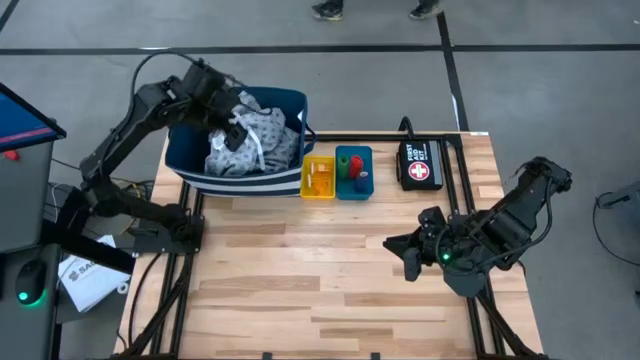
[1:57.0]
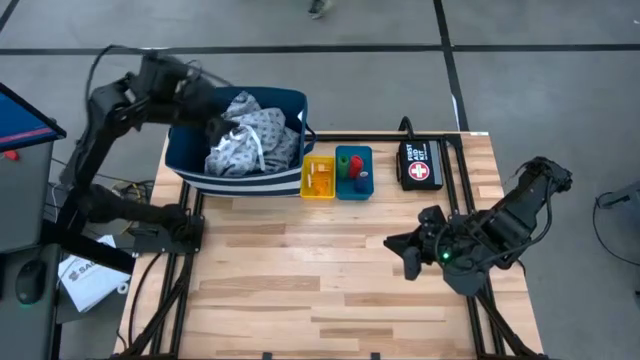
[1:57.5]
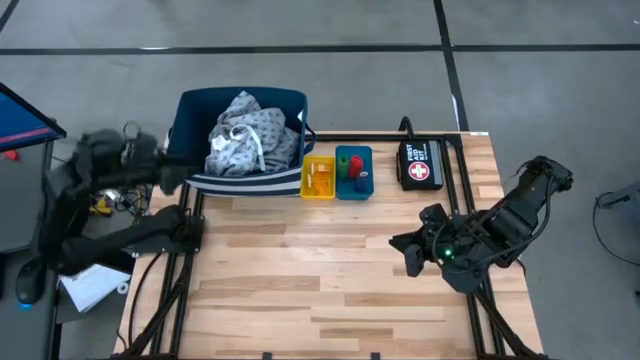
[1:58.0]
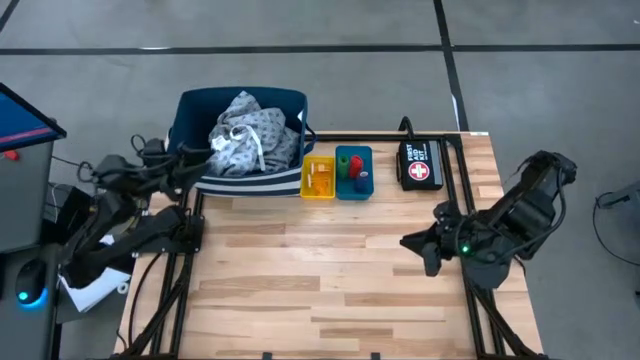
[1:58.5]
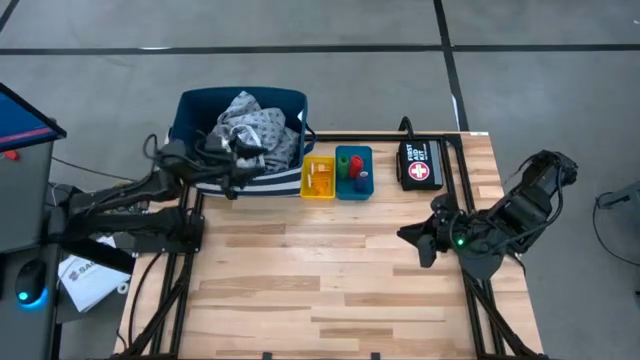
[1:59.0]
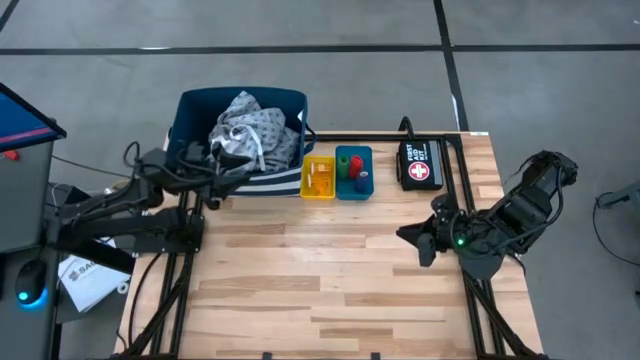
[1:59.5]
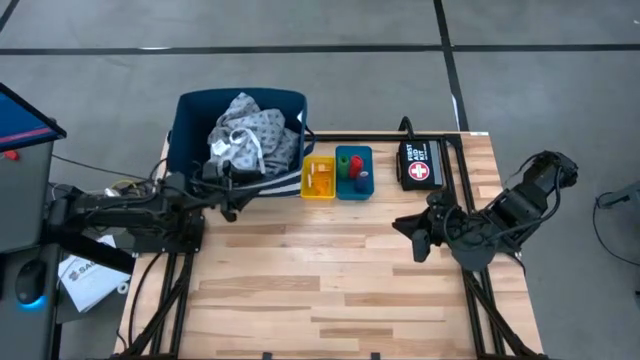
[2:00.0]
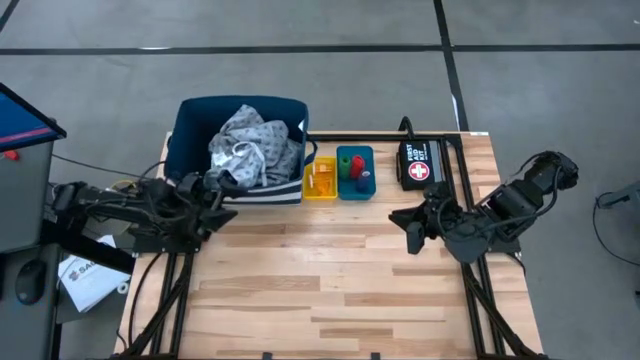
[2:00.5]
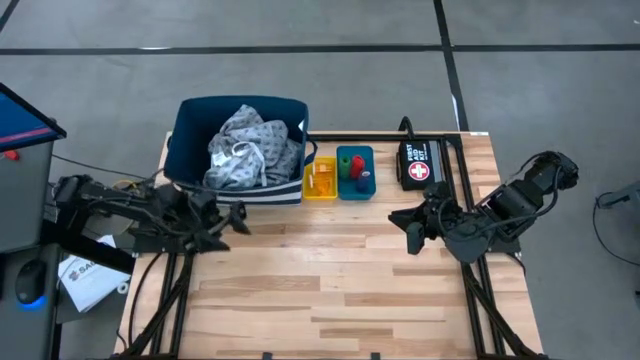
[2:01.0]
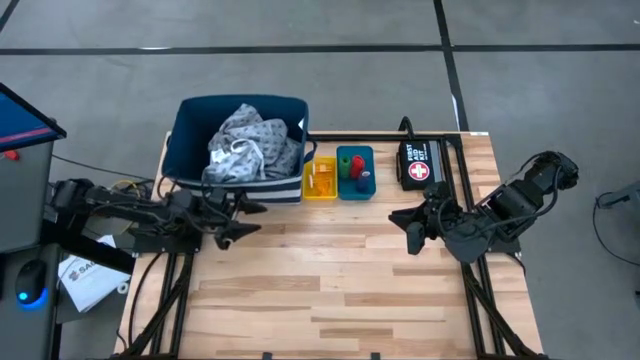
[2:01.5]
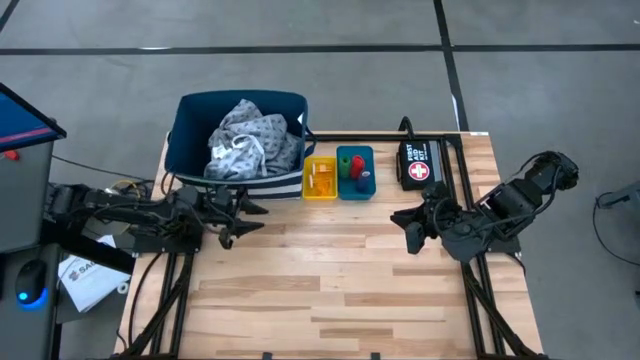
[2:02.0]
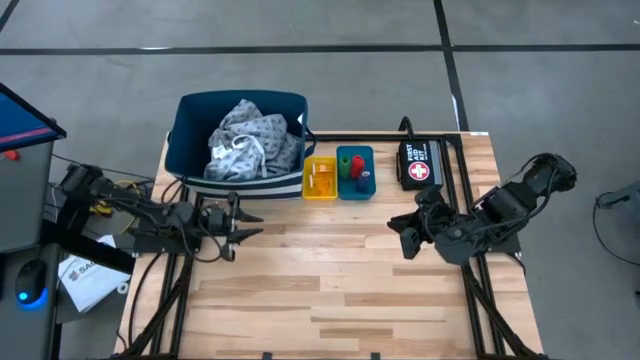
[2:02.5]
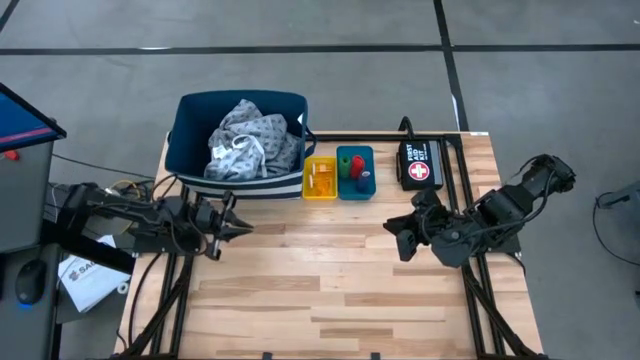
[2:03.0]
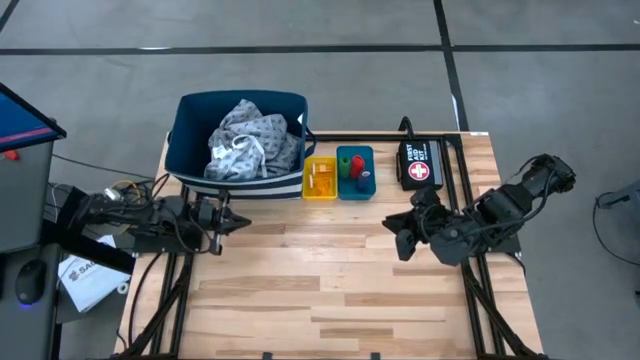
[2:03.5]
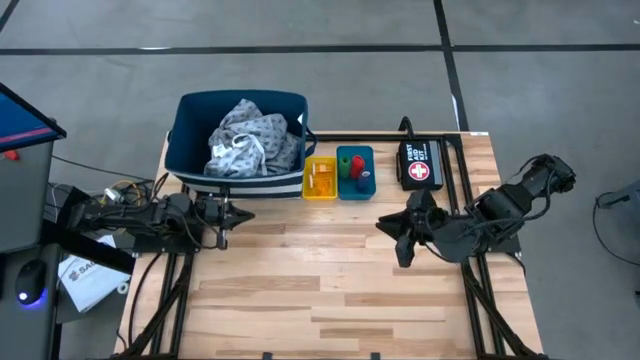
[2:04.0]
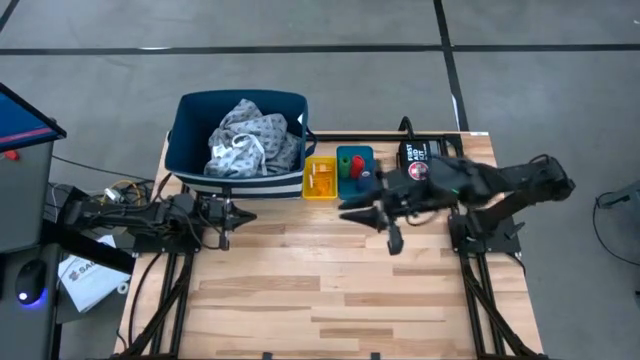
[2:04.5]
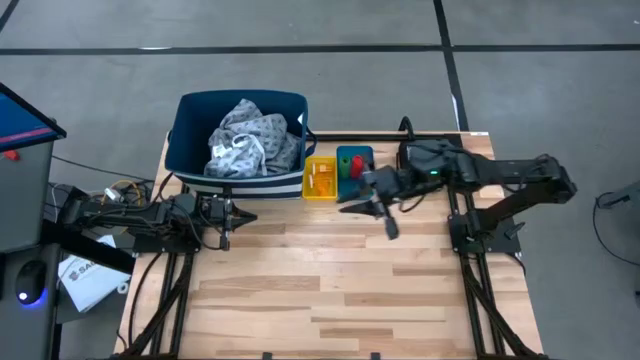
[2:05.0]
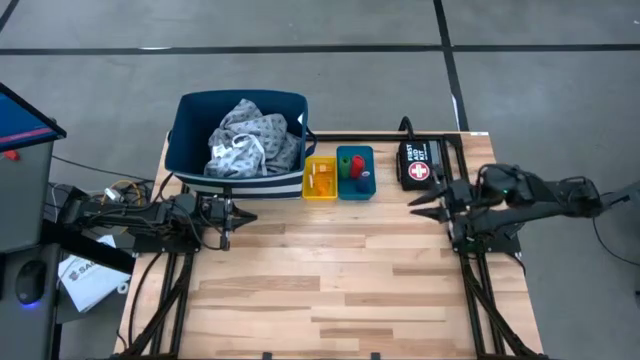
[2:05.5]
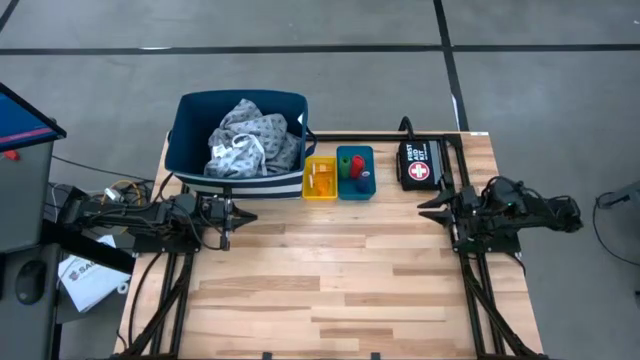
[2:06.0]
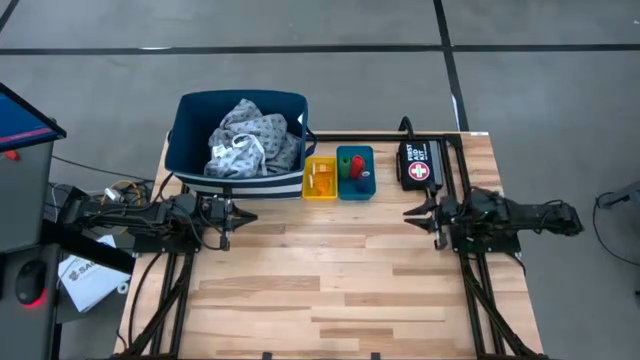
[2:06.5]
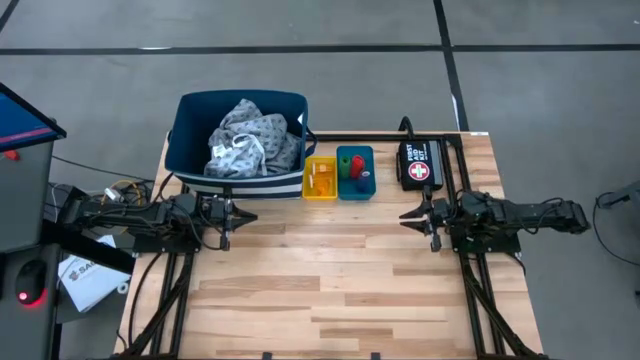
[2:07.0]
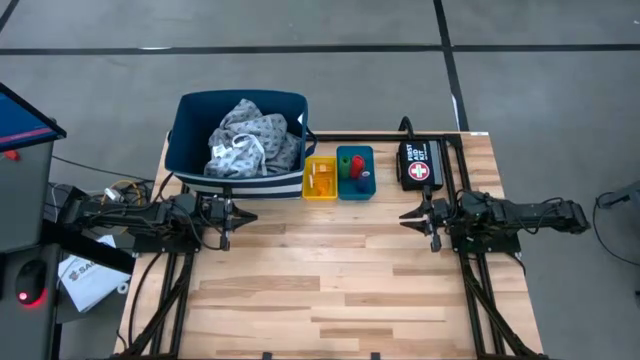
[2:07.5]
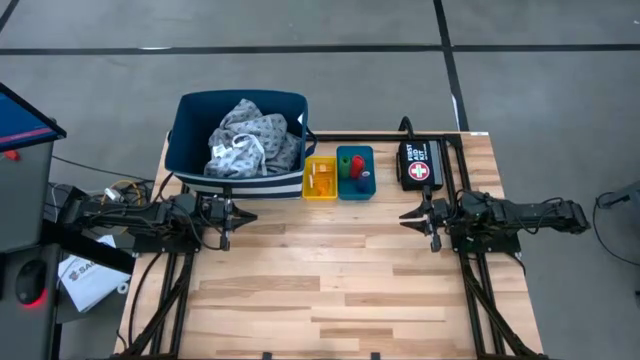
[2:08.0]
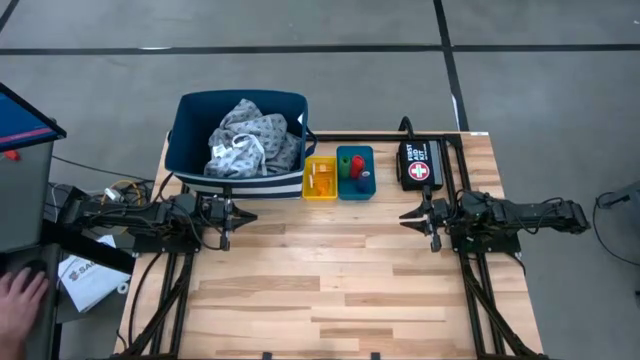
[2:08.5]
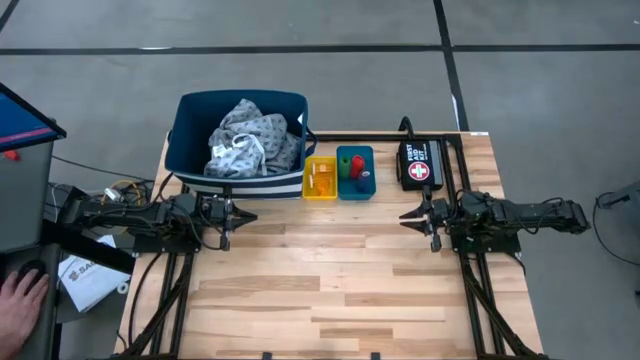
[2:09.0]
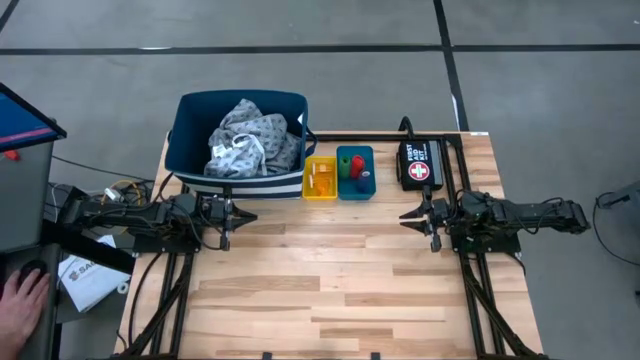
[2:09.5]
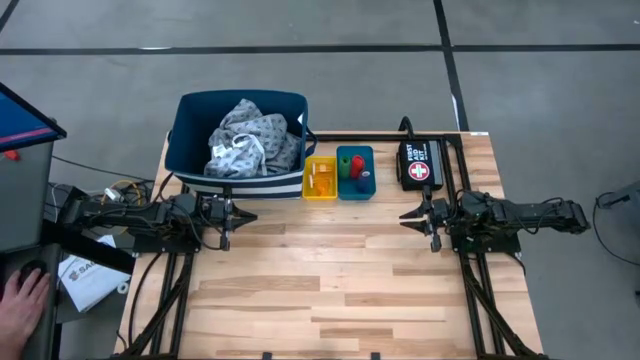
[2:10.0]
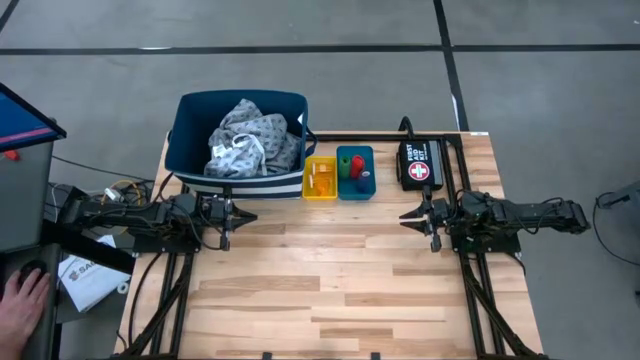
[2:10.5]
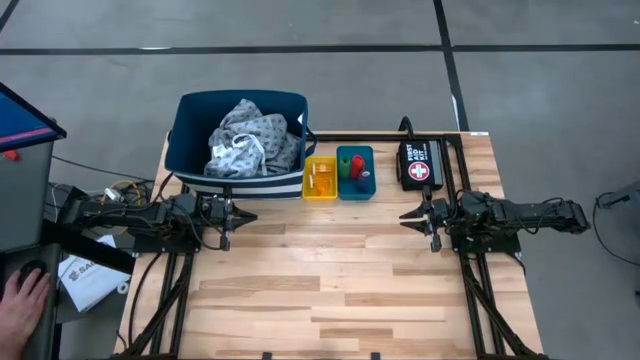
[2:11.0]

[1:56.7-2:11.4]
Task: Pick & place medical supplies in basket/bin
Return to Home Position

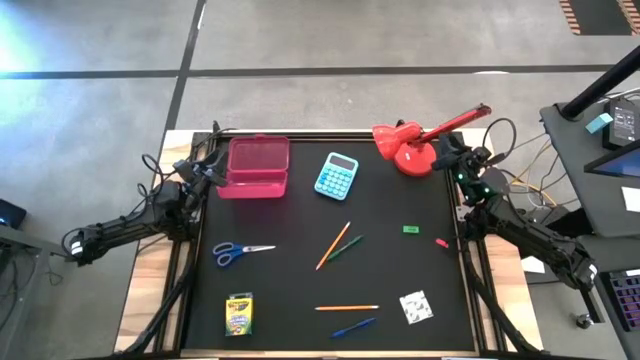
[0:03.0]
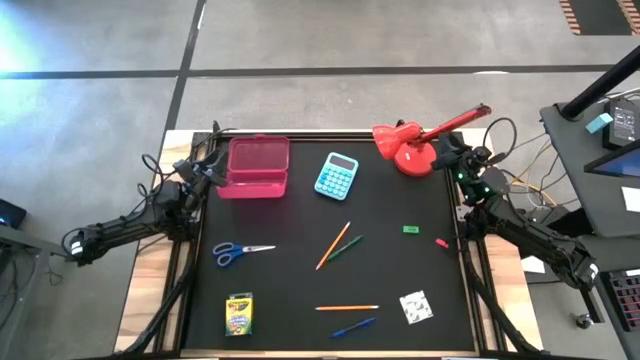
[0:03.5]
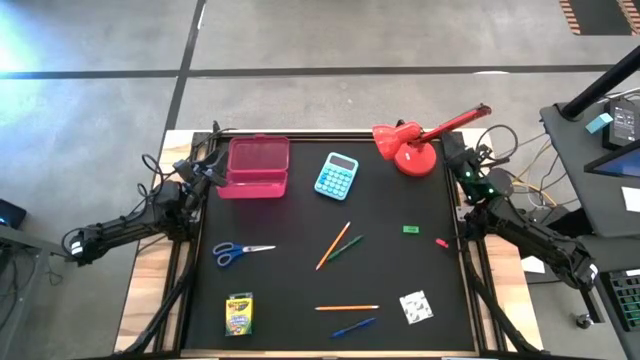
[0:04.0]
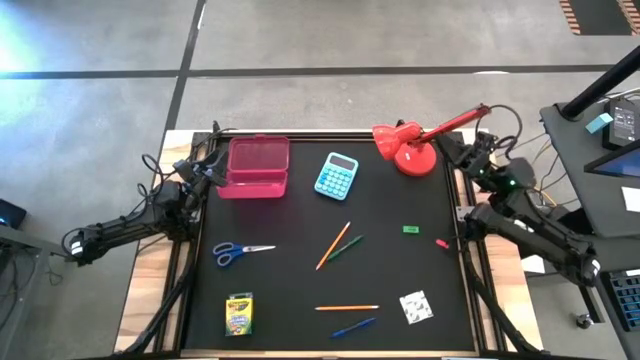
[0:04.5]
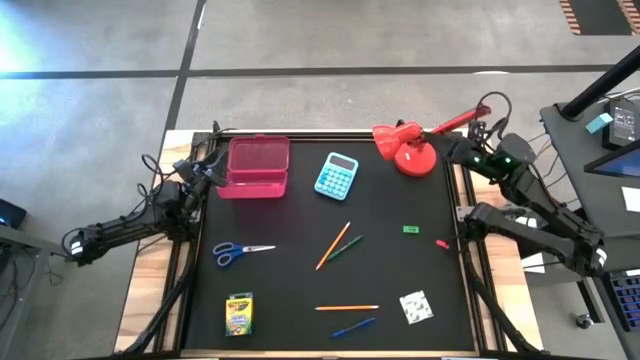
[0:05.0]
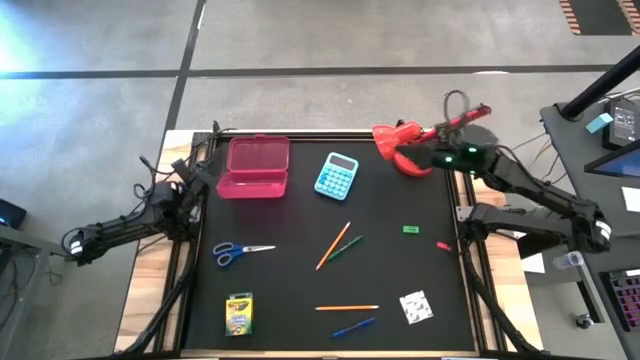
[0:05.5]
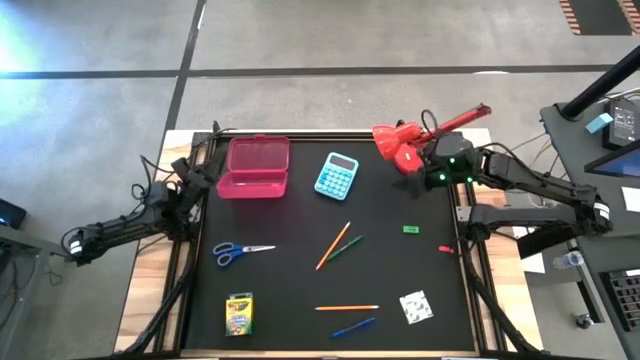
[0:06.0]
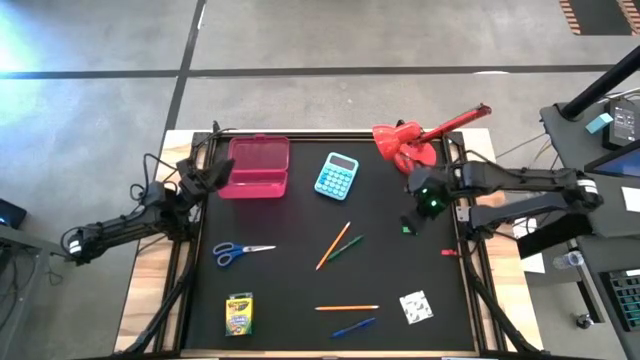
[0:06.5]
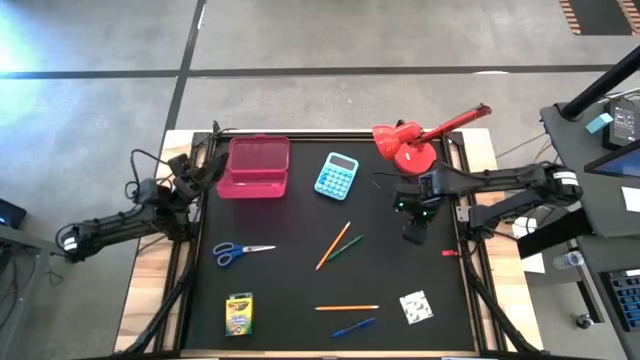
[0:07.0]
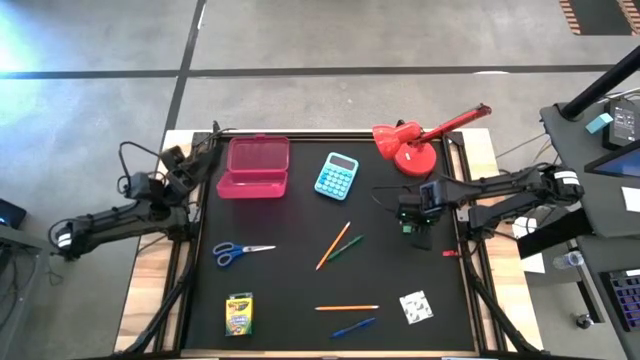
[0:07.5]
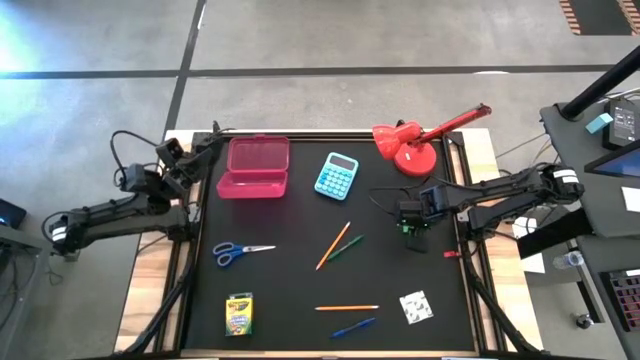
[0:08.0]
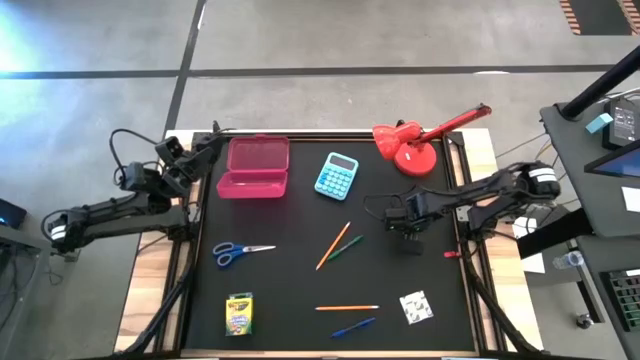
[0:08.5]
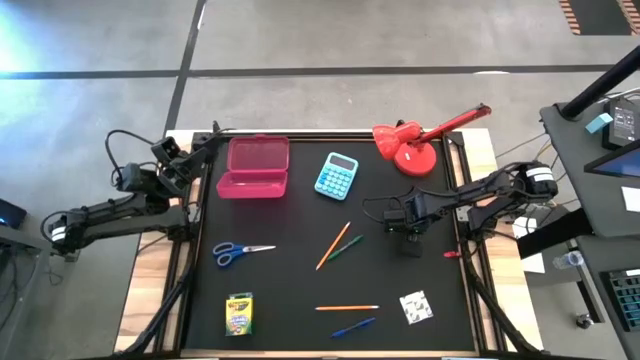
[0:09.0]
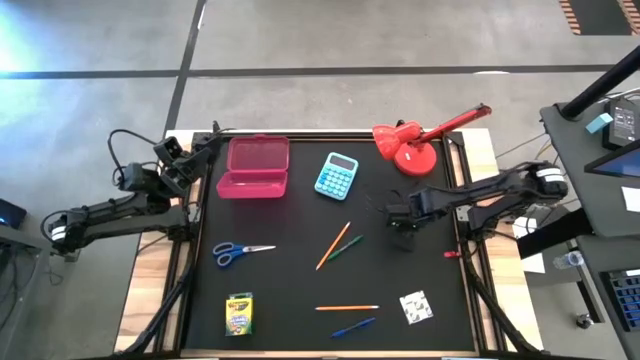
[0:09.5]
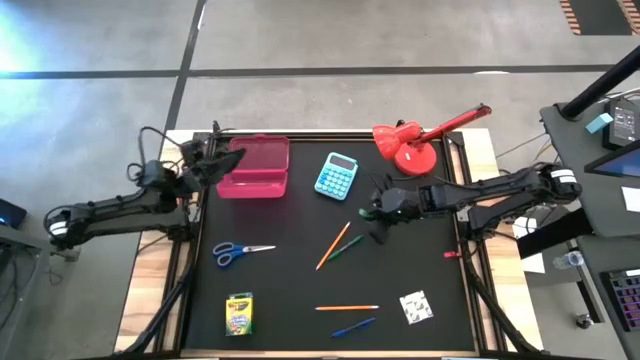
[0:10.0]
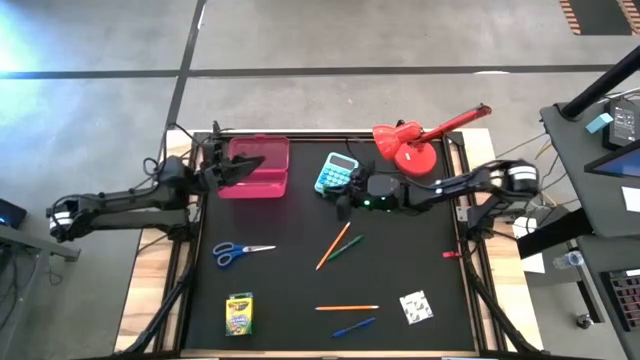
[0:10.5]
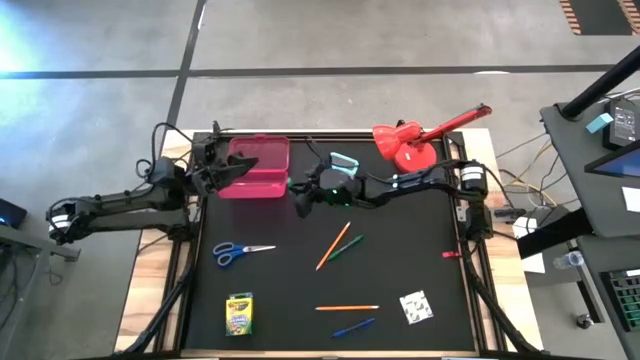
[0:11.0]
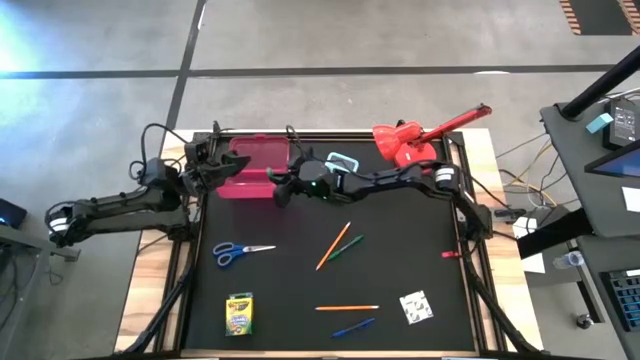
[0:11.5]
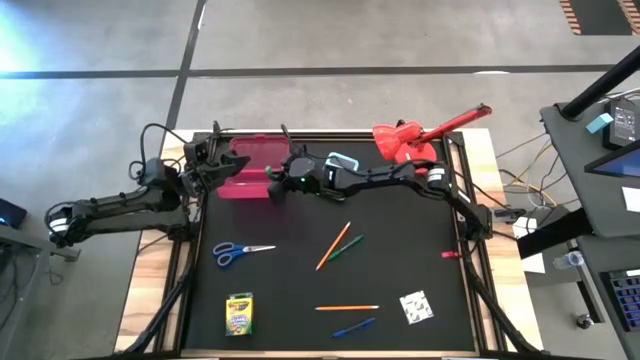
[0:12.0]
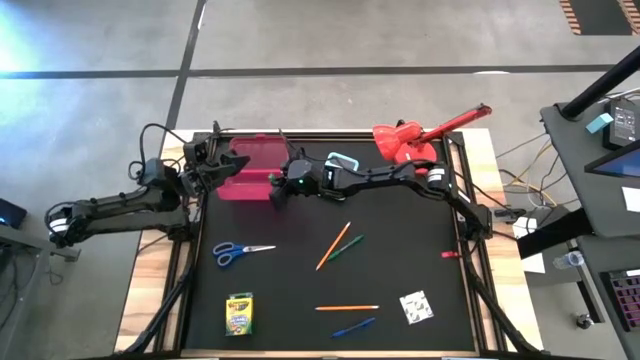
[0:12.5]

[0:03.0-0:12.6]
Task: Pack school essentials
Put the green eraser into the red supply box
